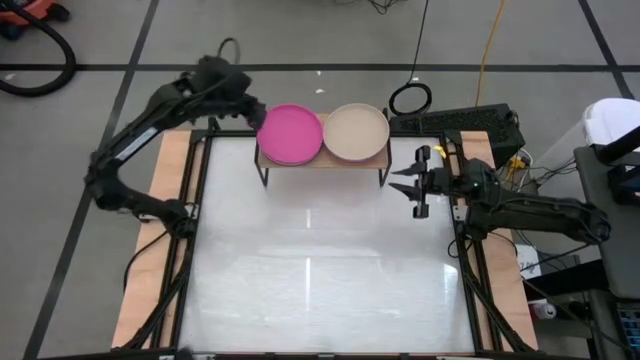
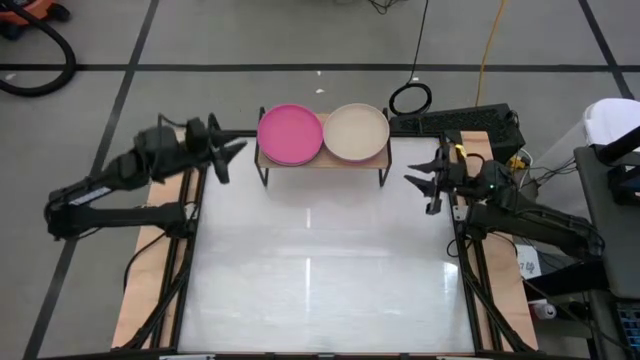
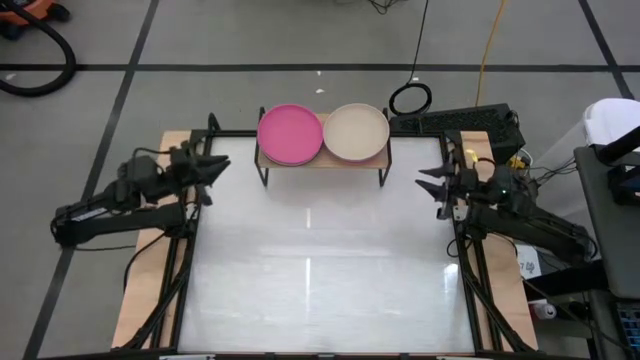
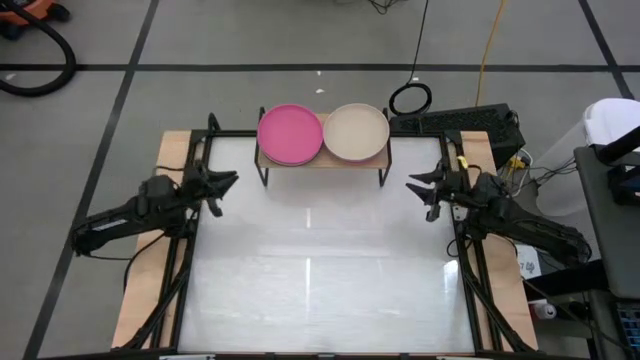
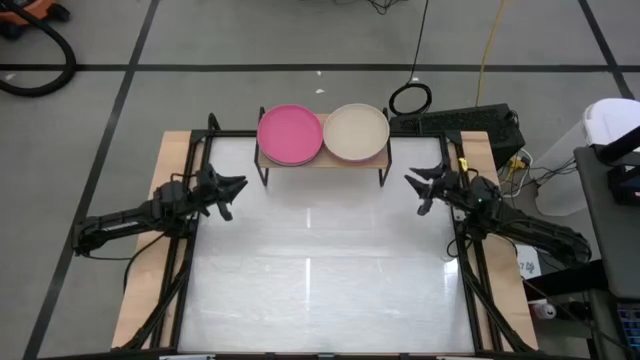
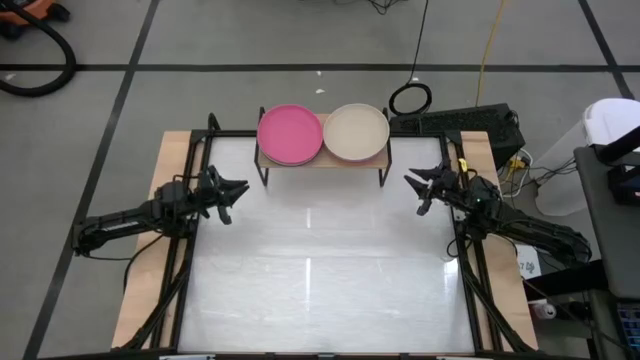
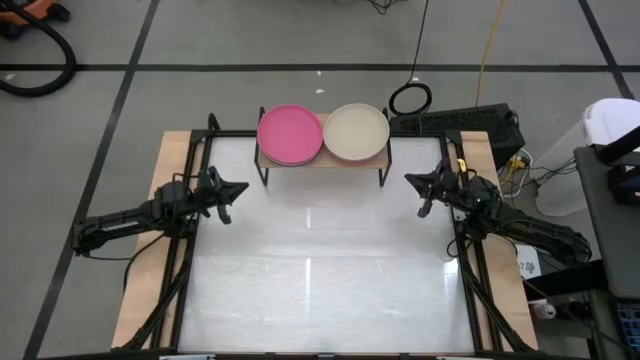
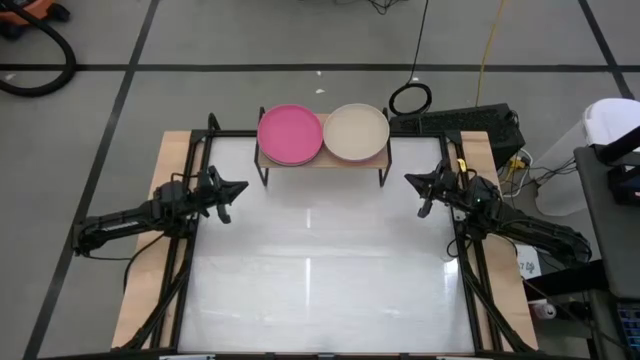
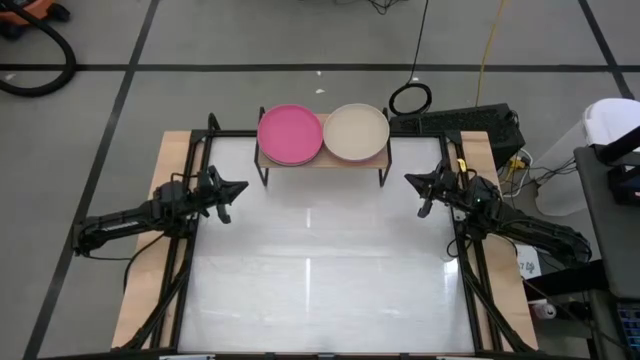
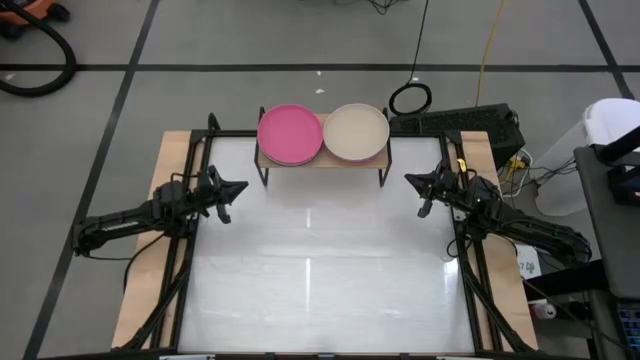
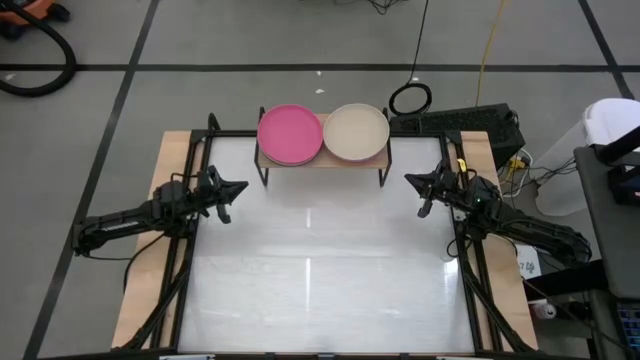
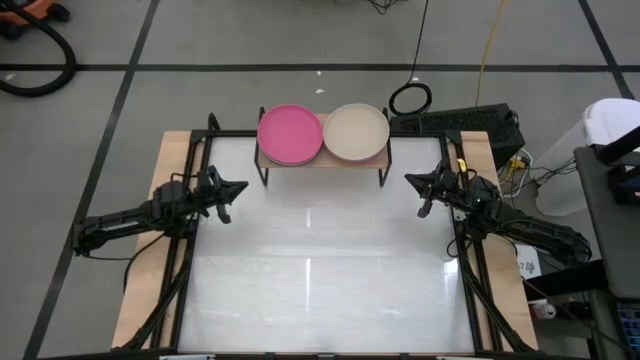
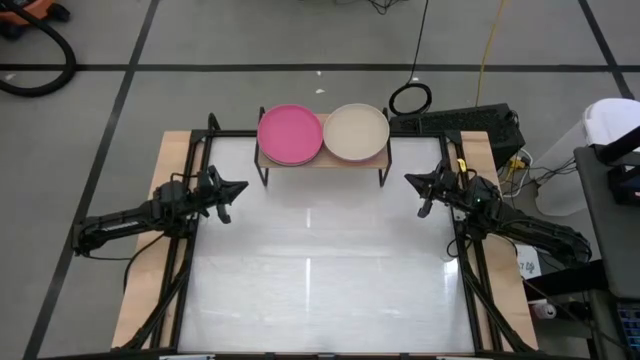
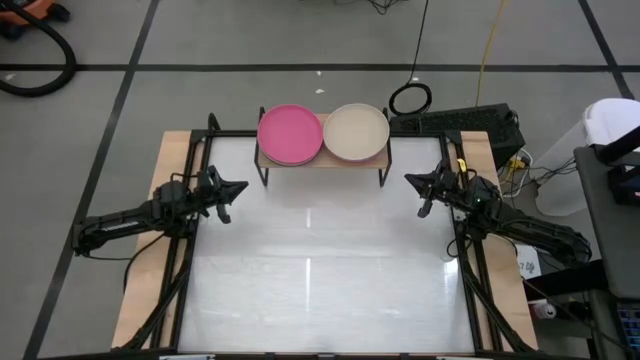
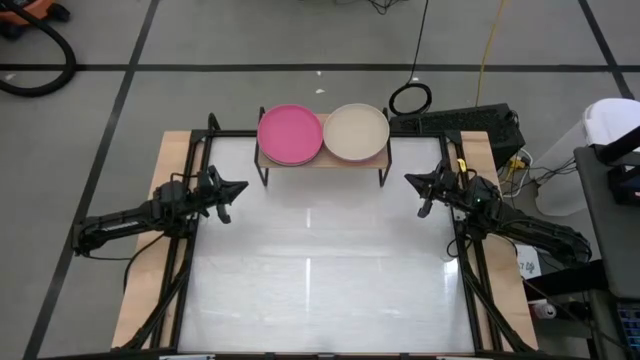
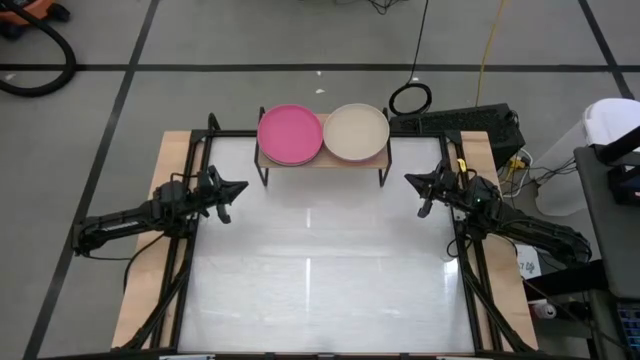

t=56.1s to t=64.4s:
Task: Place and stack plates onto a shelf
Return to Home Position

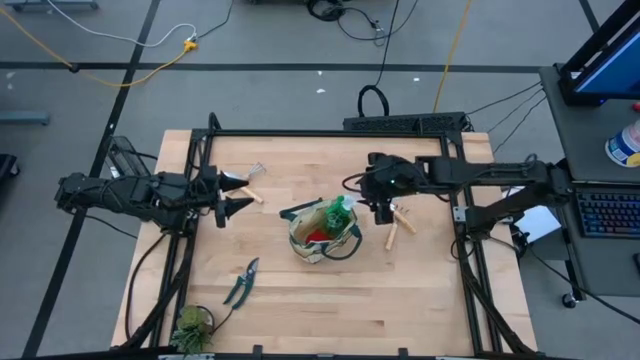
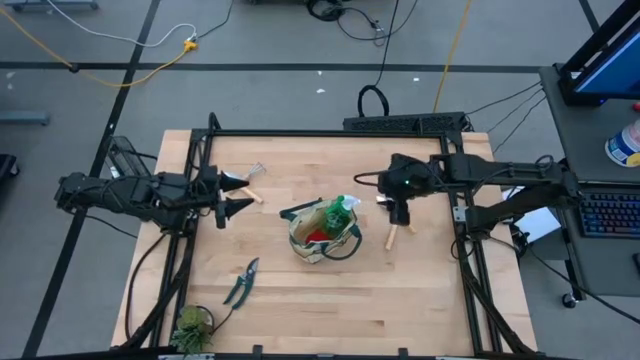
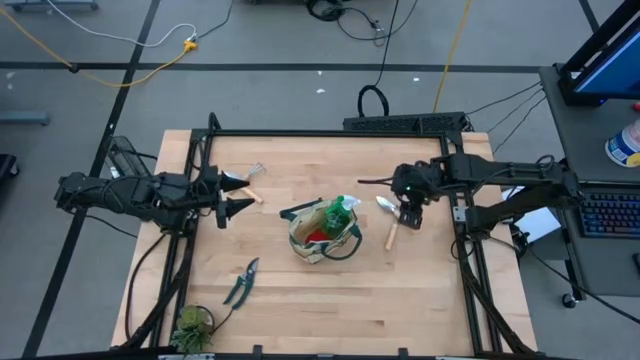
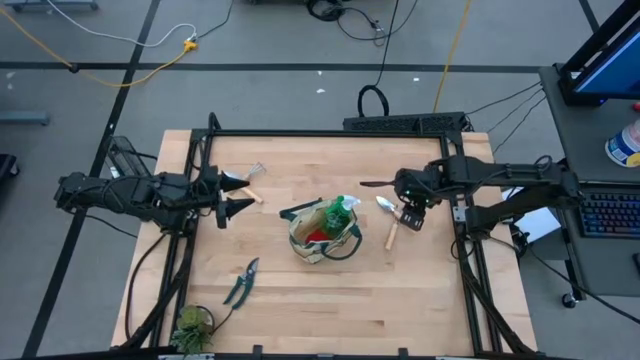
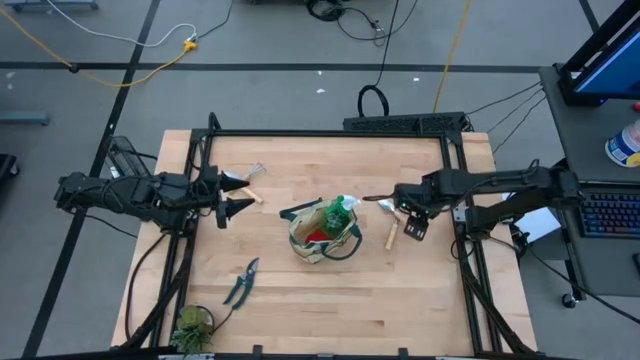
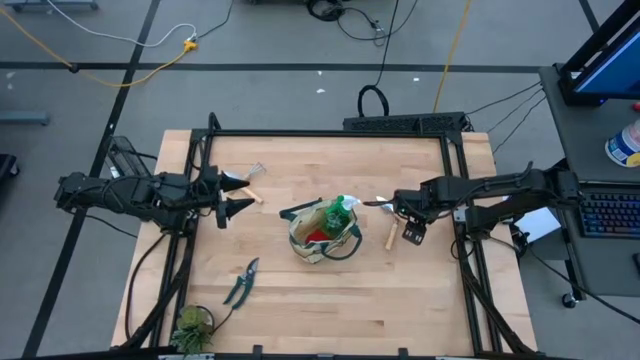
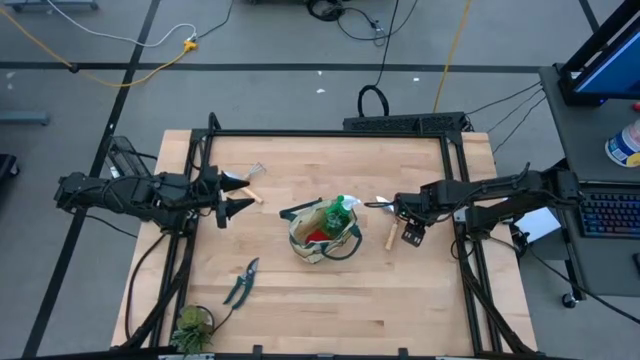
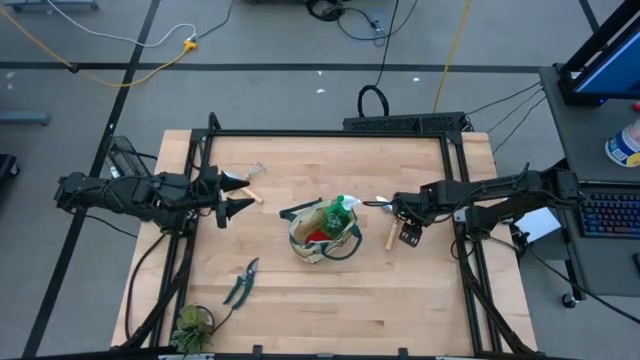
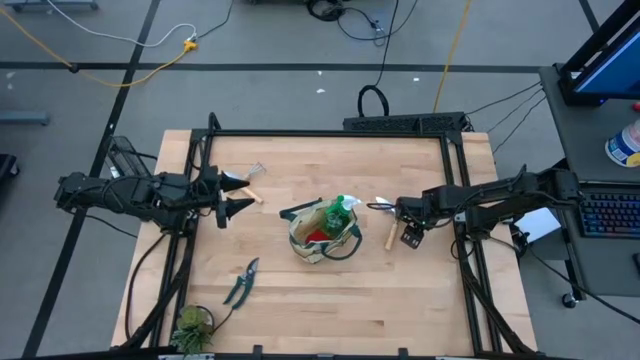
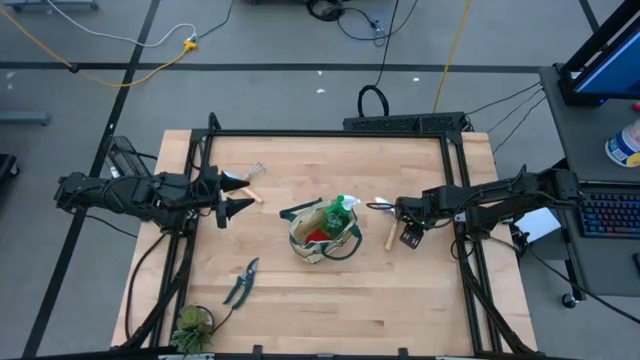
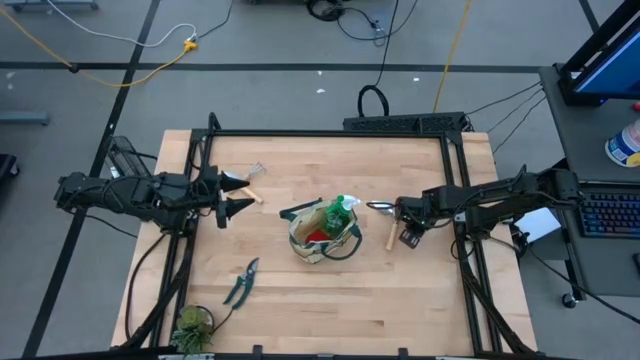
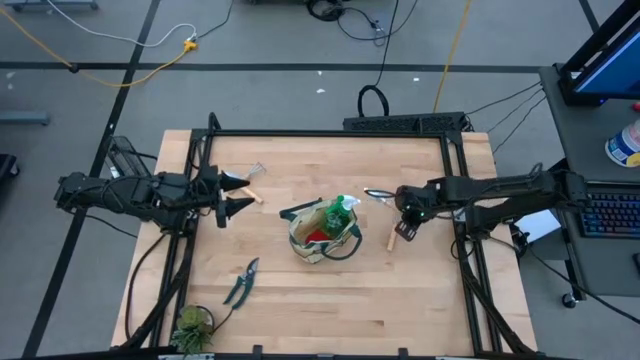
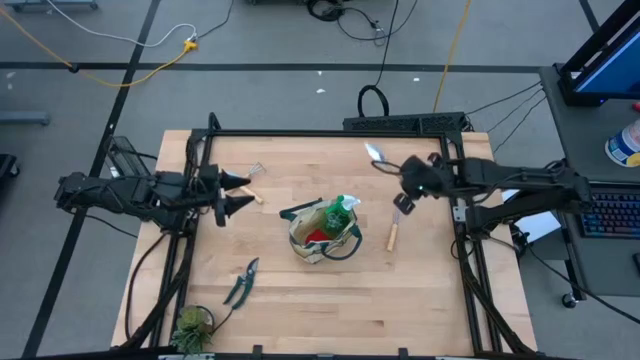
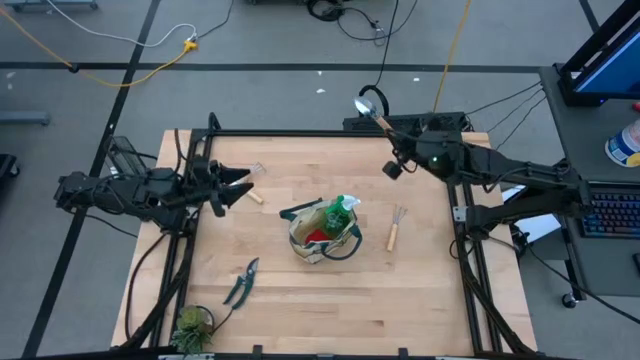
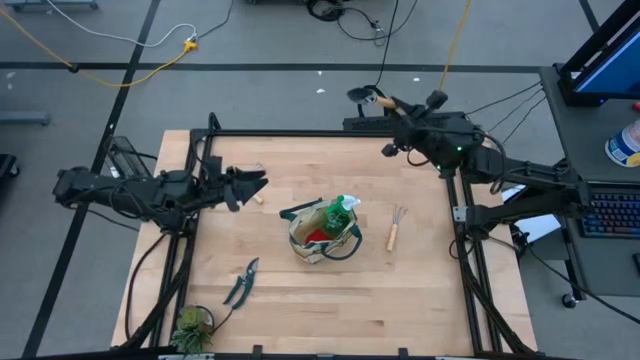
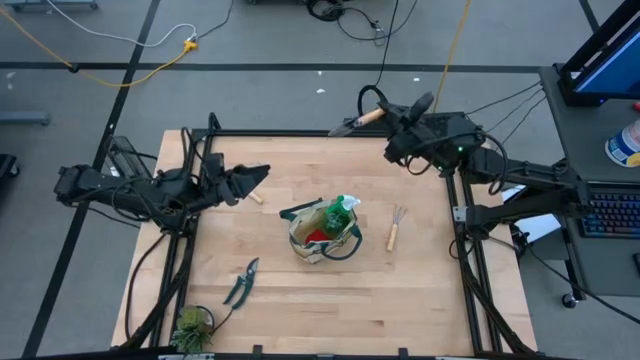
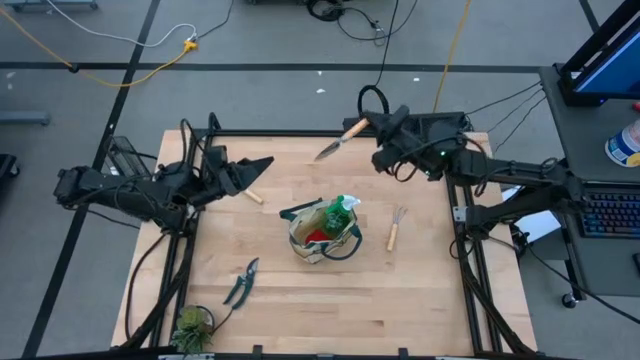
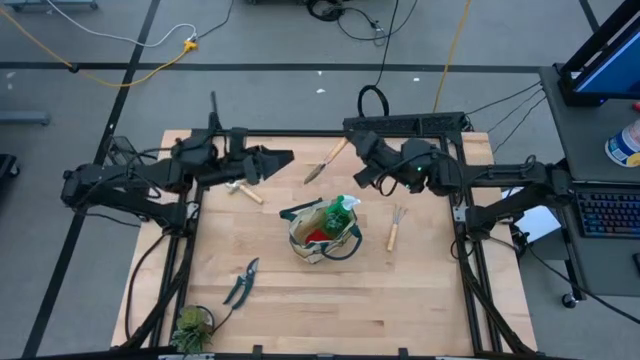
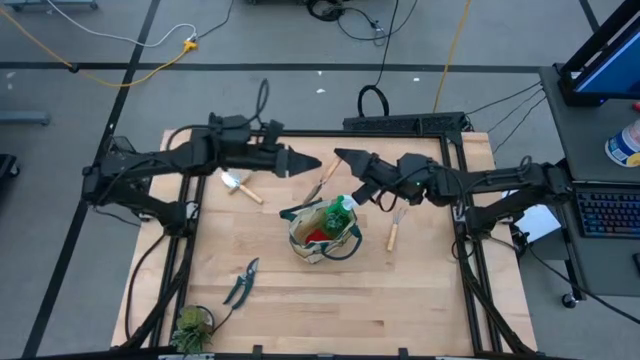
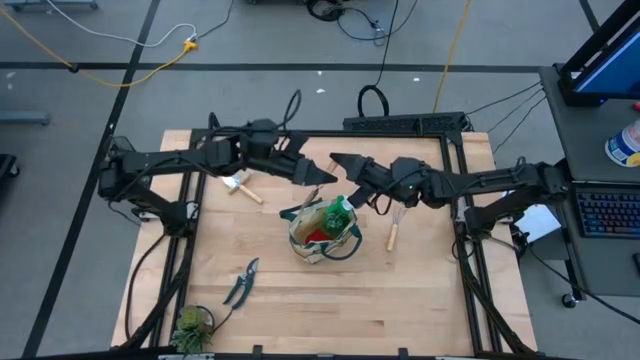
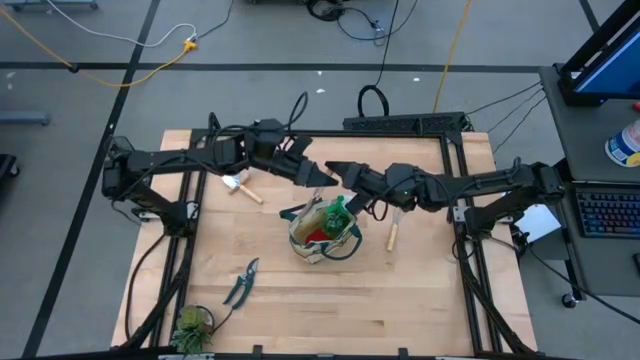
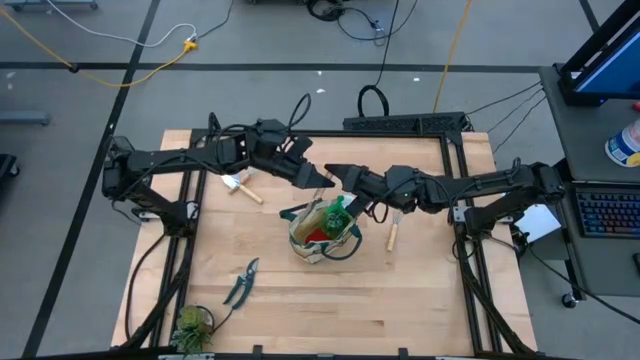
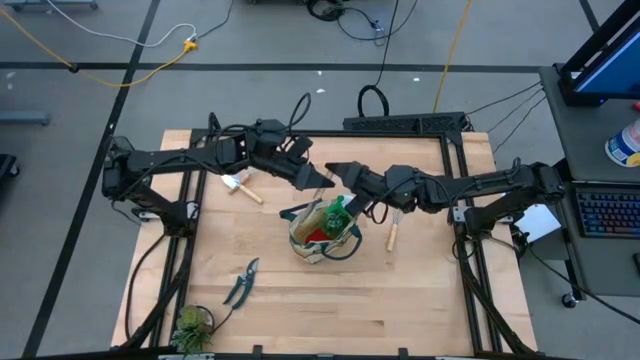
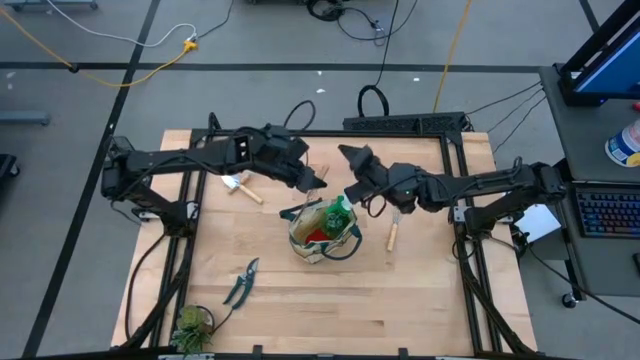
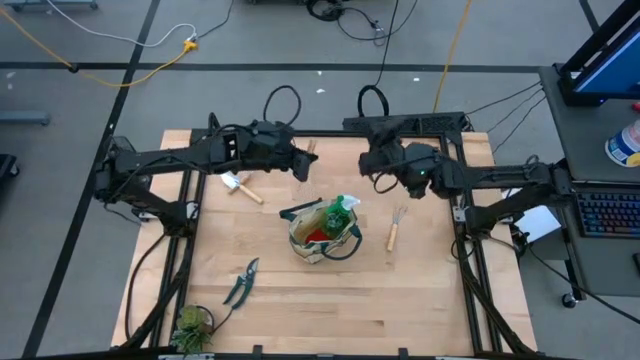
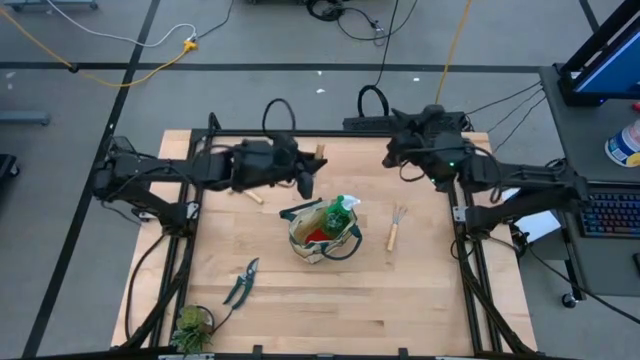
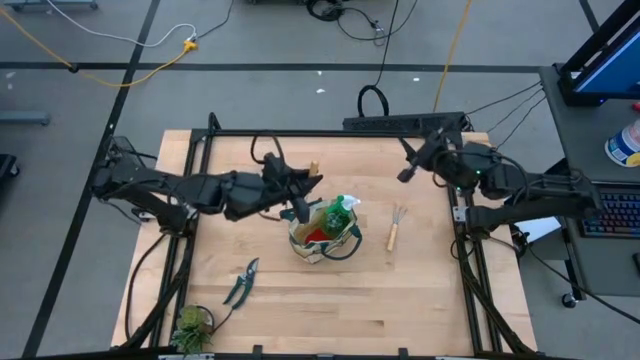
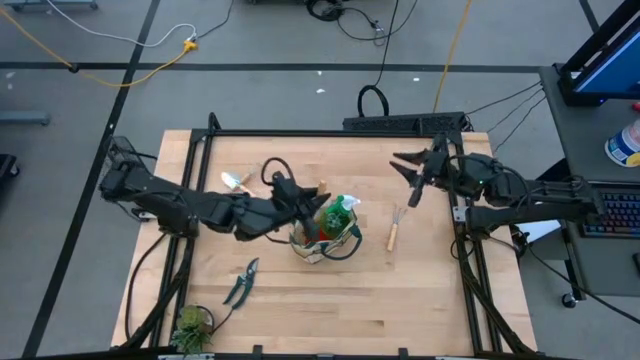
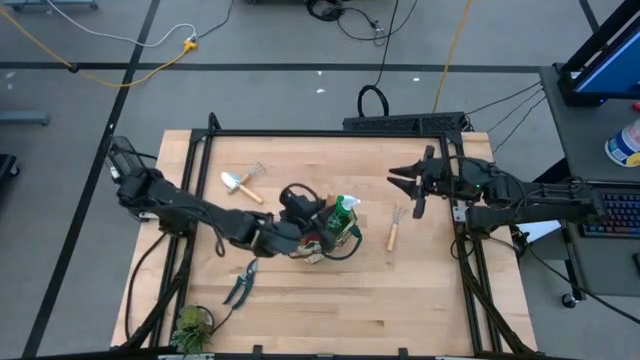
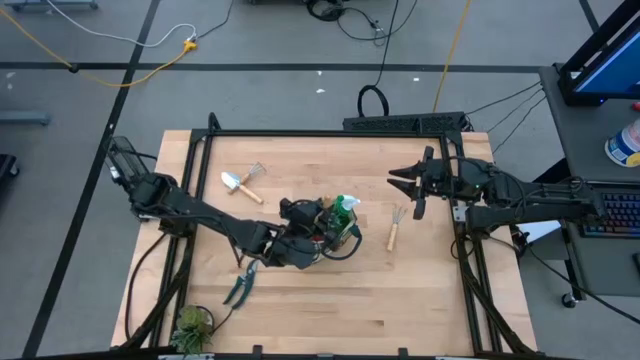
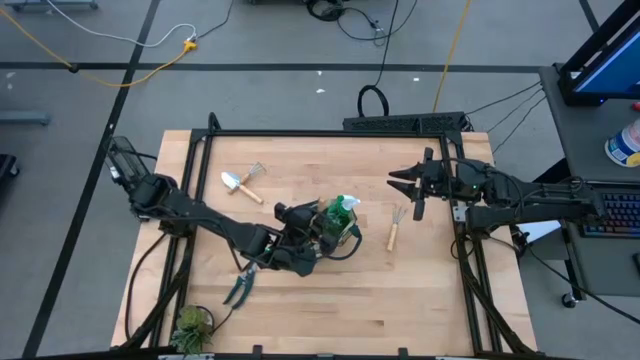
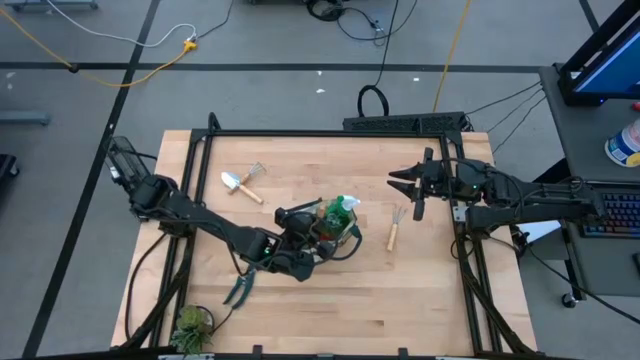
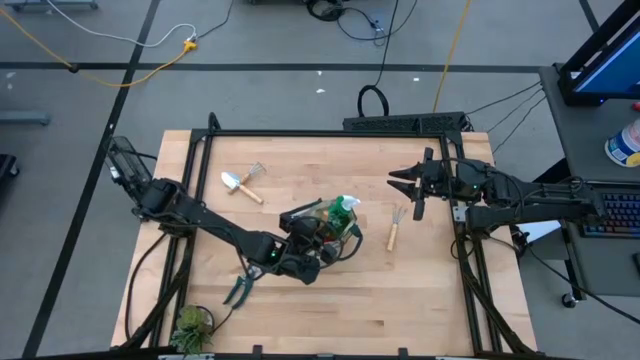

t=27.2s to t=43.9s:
Task: Pick & Place Garden tools in Gardening bag
Put the right trowel into the gardening bag
